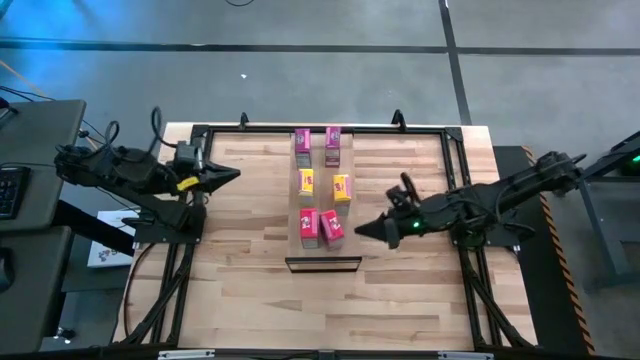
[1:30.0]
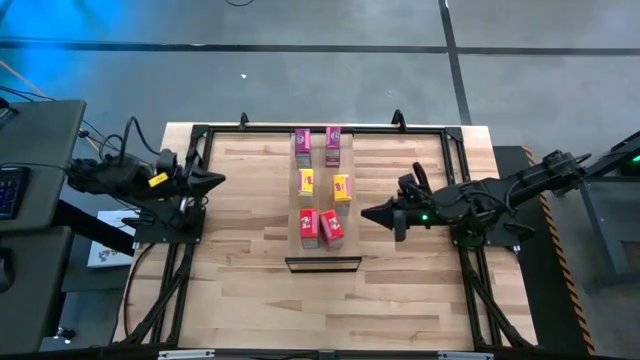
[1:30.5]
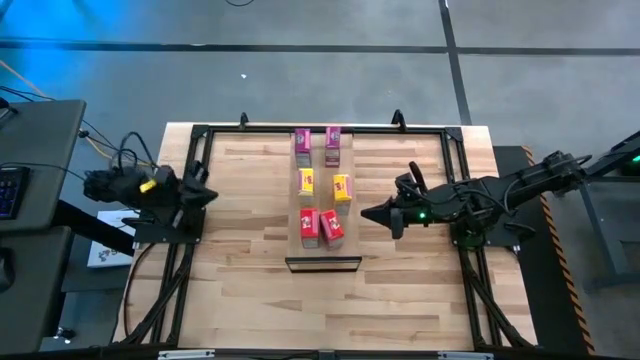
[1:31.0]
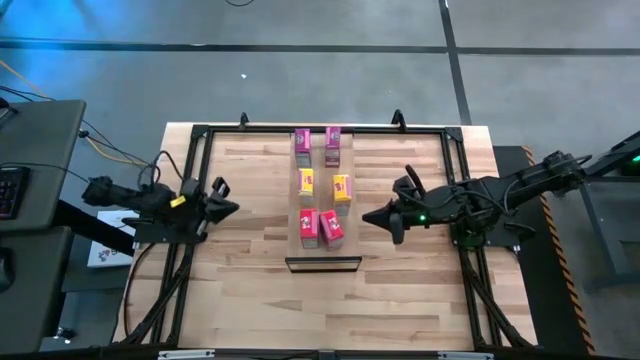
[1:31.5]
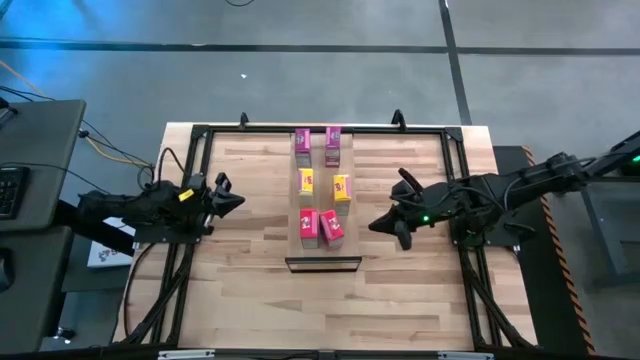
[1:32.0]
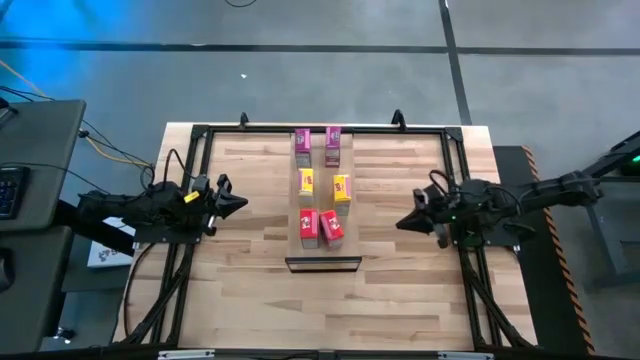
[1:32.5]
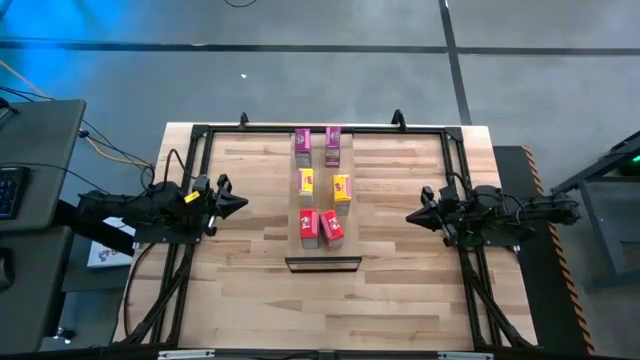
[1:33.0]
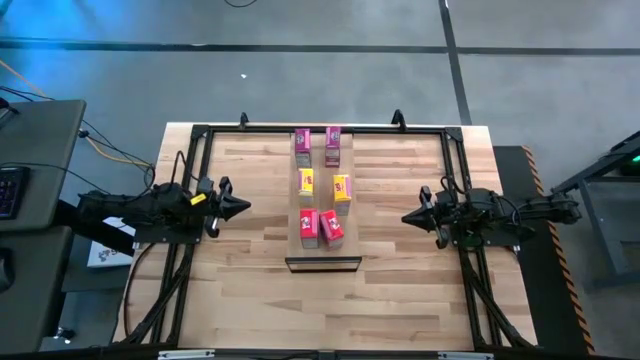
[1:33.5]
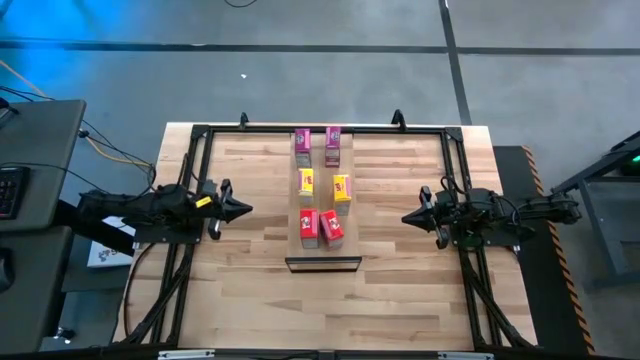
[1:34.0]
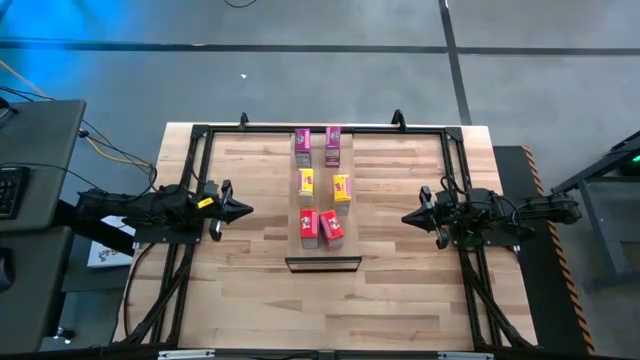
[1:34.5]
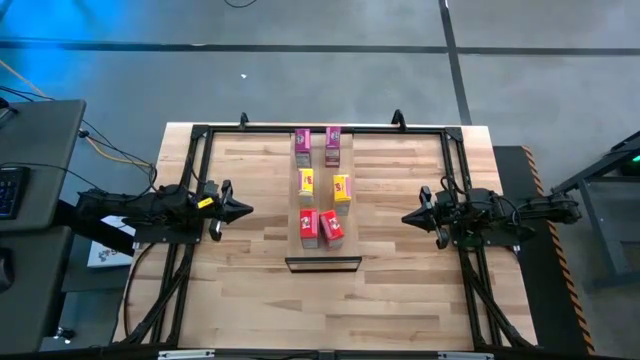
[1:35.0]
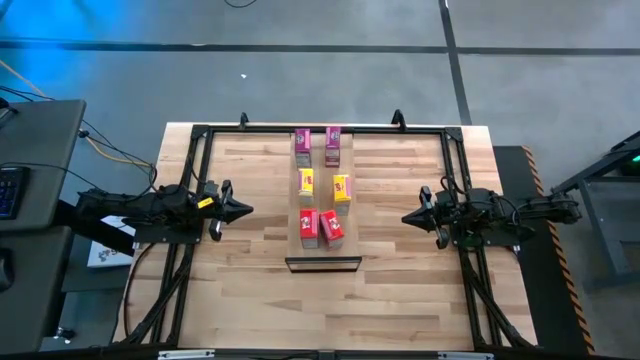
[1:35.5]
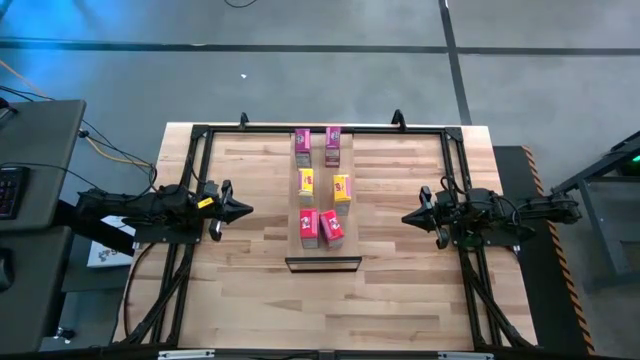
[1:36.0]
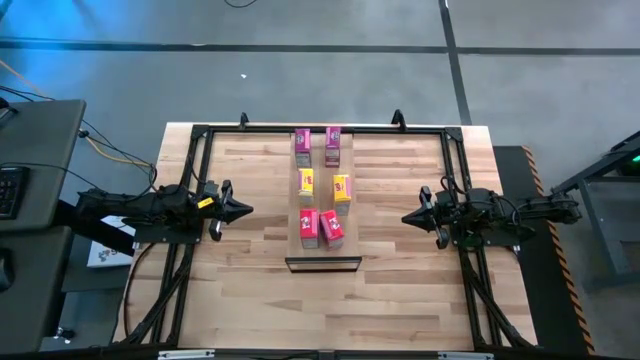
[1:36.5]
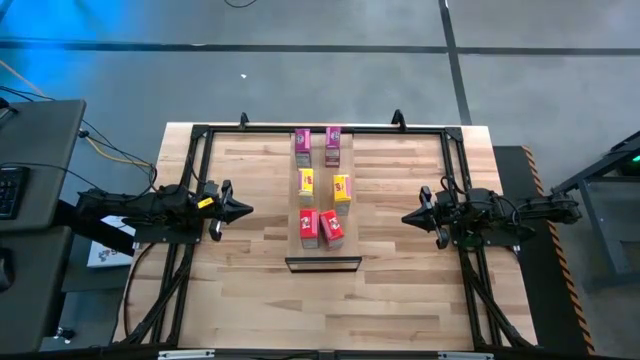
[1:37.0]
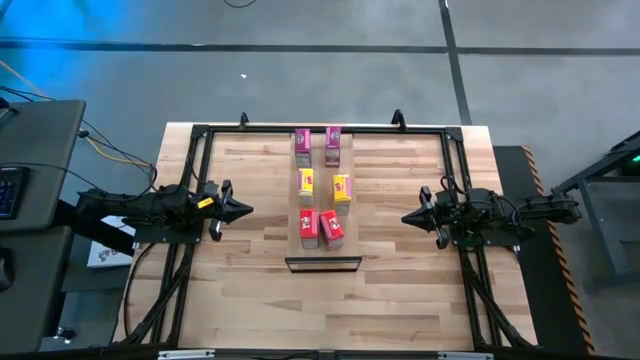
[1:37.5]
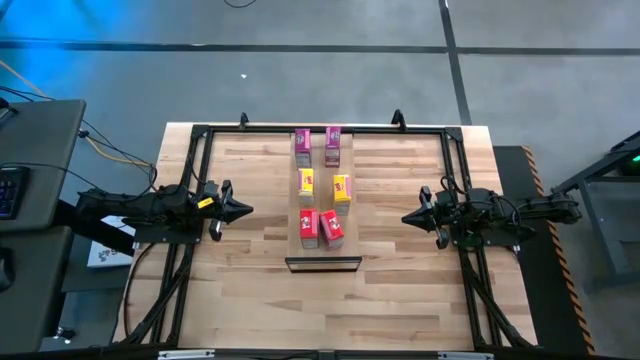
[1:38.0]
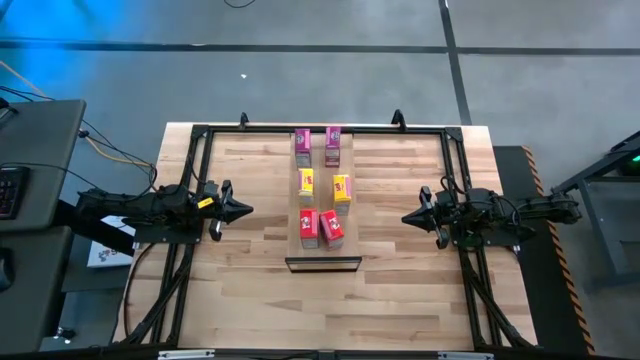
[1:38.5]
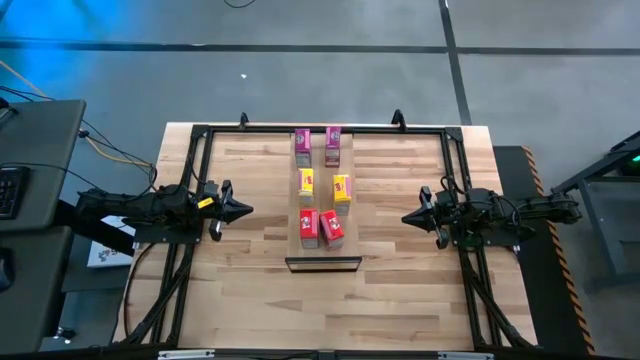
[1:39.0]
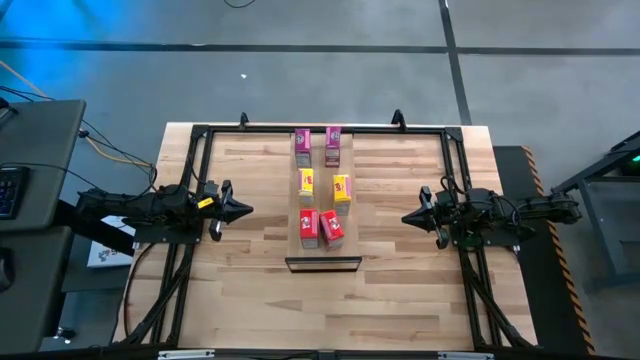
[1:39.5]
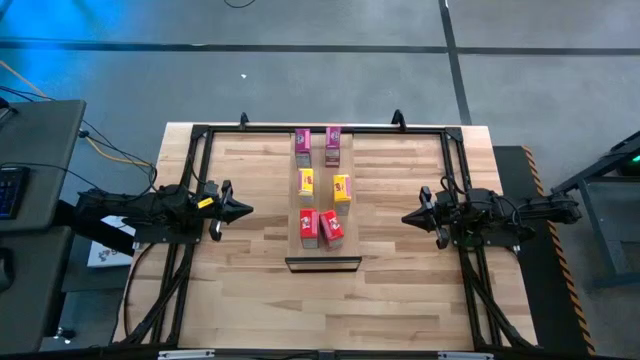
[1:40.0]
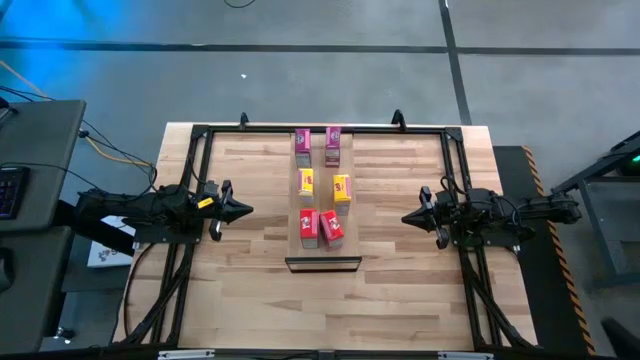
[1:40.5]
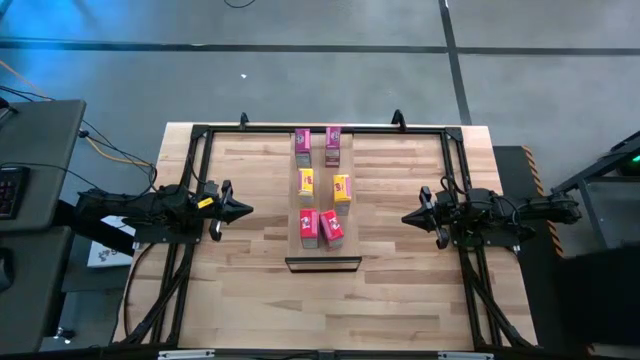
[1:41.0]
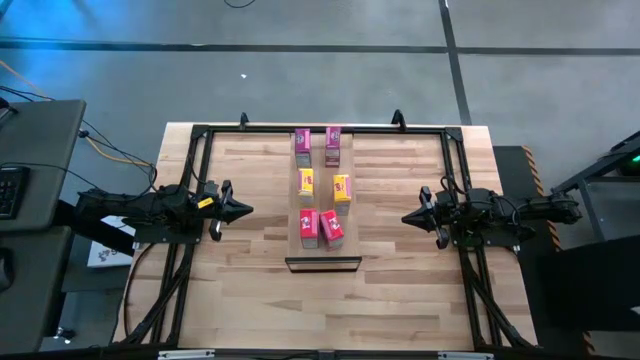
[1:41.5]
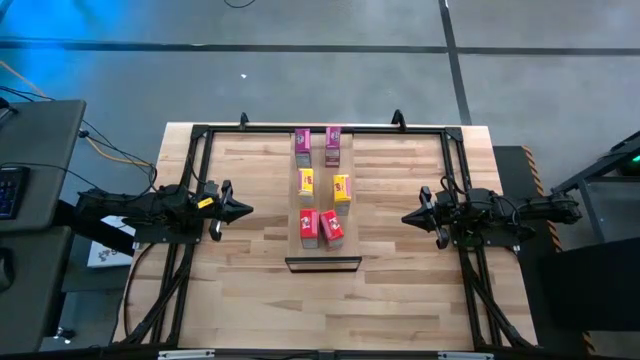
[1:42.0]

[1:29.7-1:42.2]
Task: Stack cereal on shelf
Return to Home Position

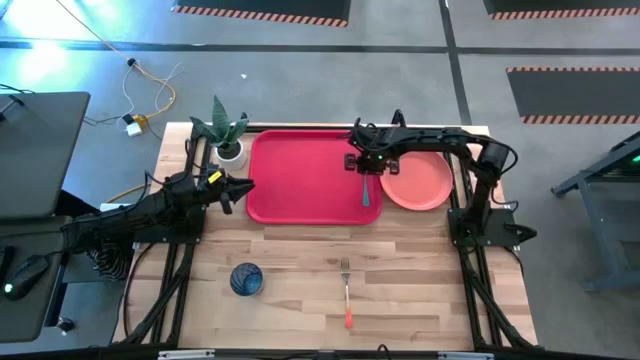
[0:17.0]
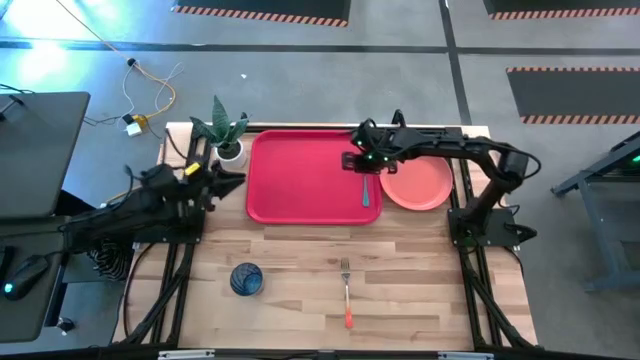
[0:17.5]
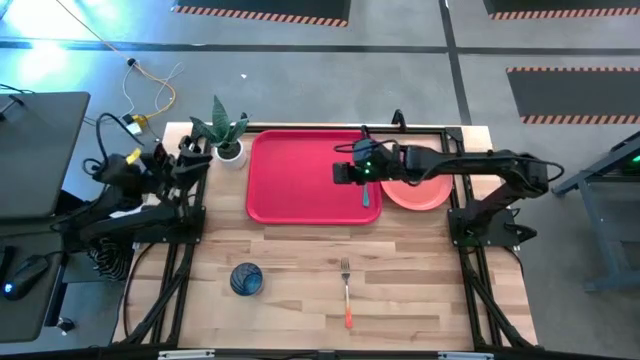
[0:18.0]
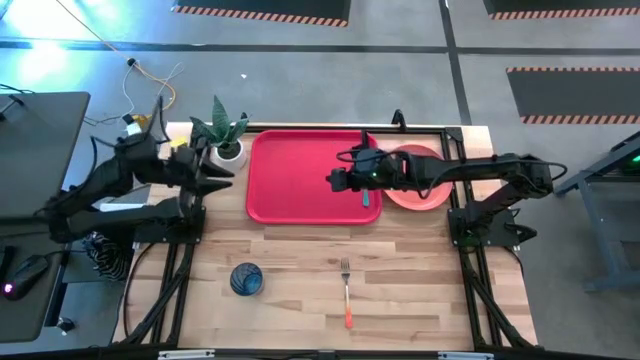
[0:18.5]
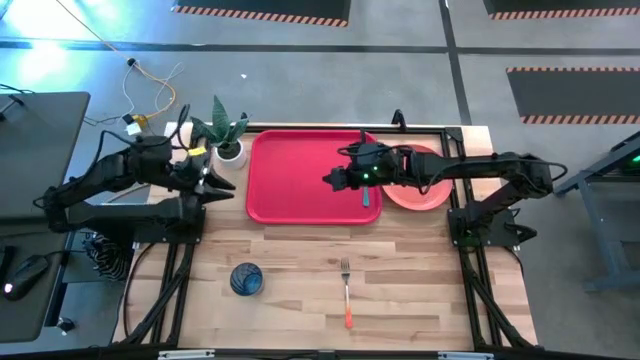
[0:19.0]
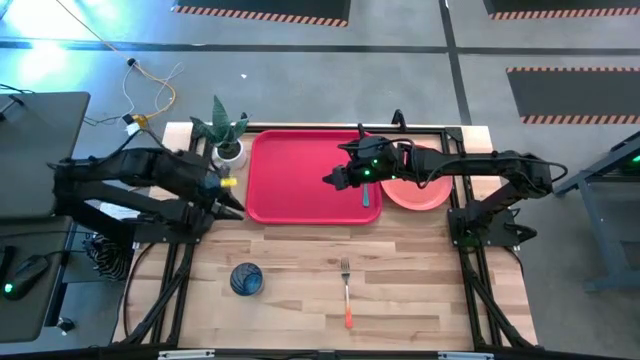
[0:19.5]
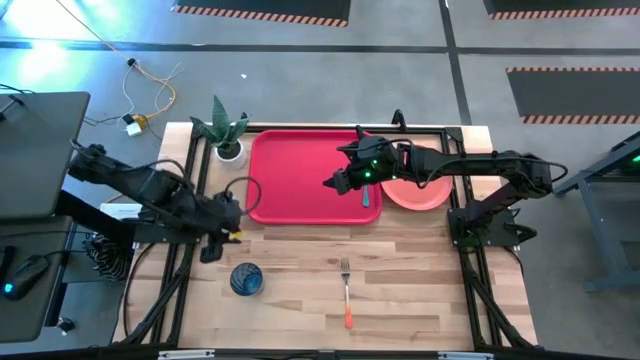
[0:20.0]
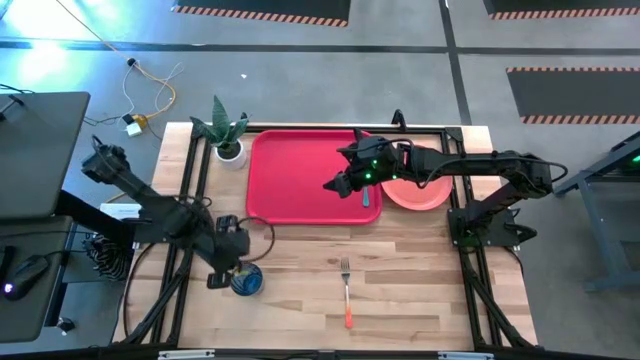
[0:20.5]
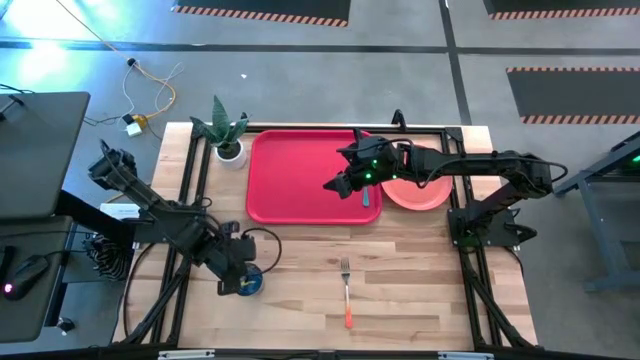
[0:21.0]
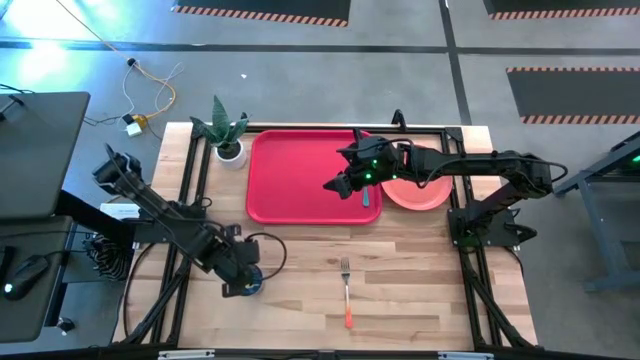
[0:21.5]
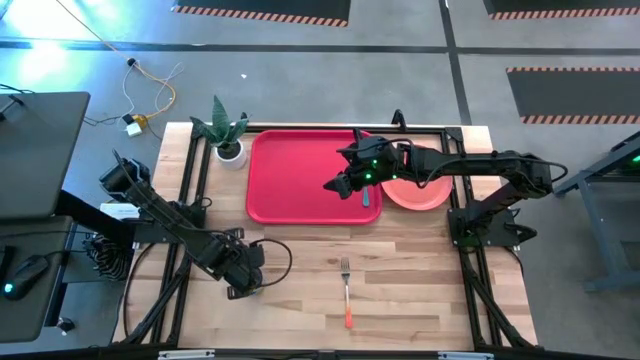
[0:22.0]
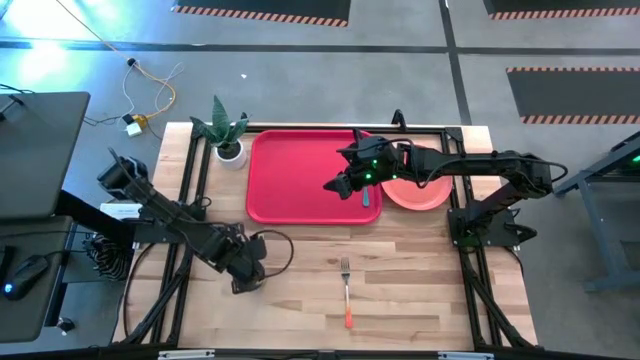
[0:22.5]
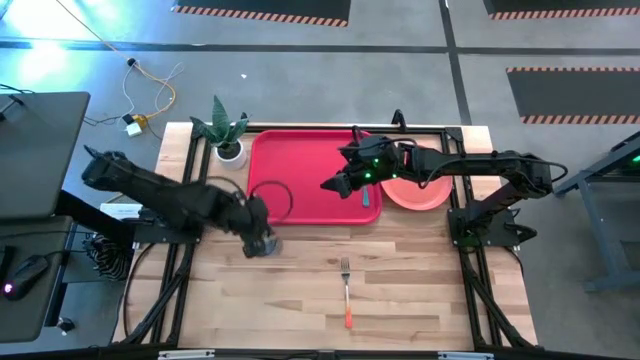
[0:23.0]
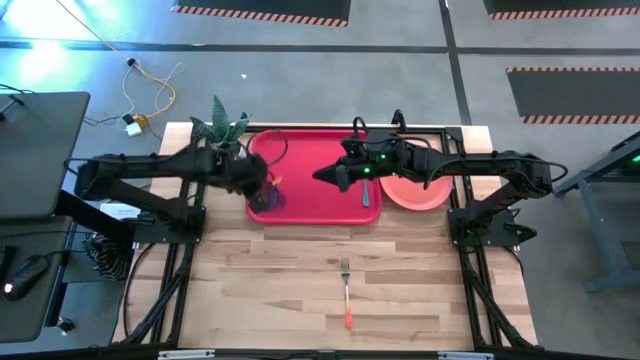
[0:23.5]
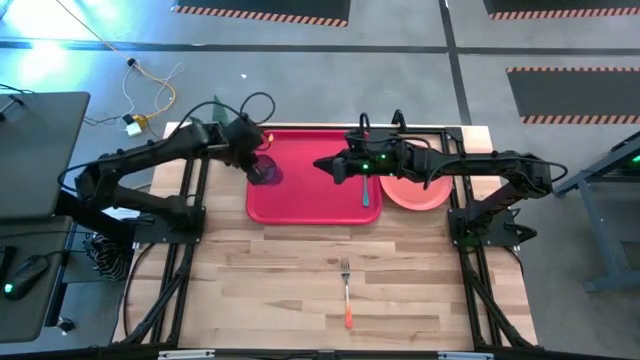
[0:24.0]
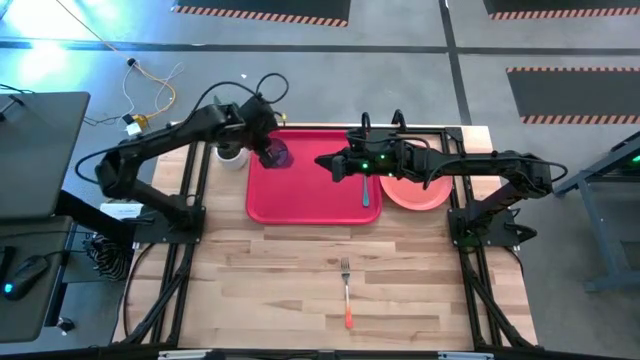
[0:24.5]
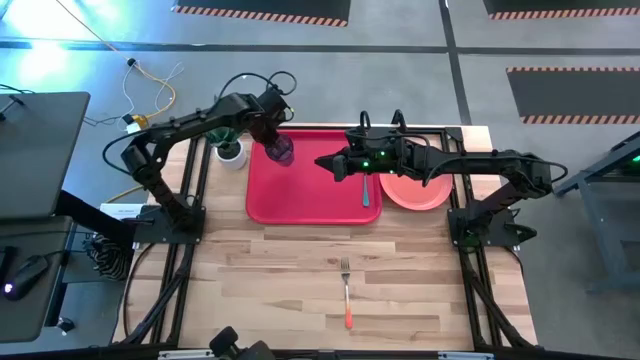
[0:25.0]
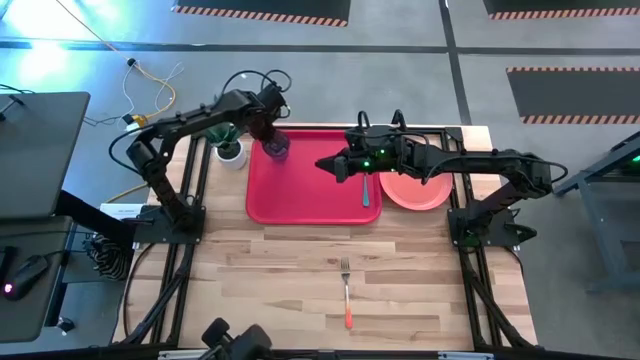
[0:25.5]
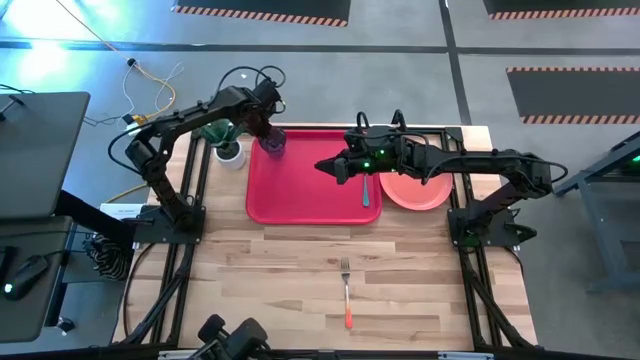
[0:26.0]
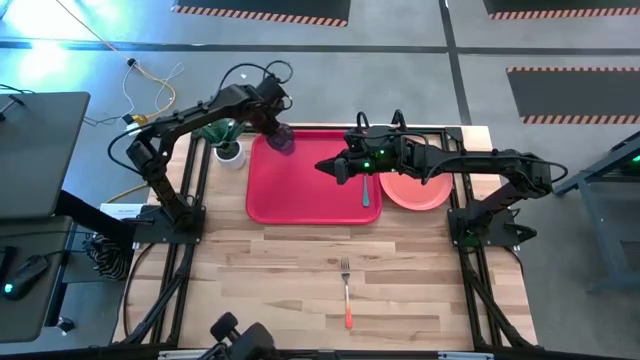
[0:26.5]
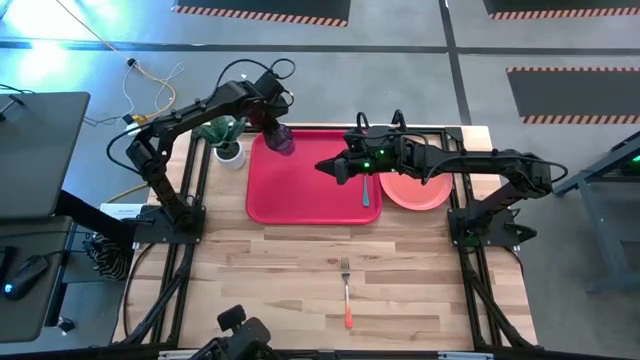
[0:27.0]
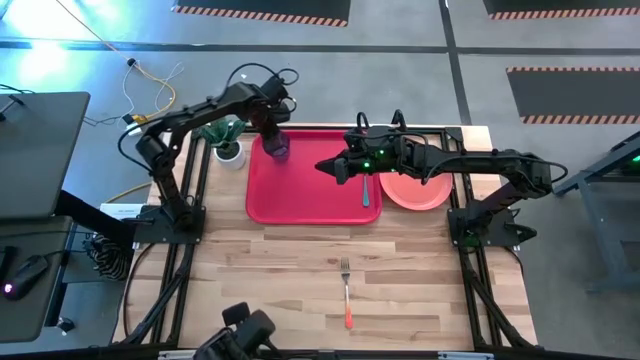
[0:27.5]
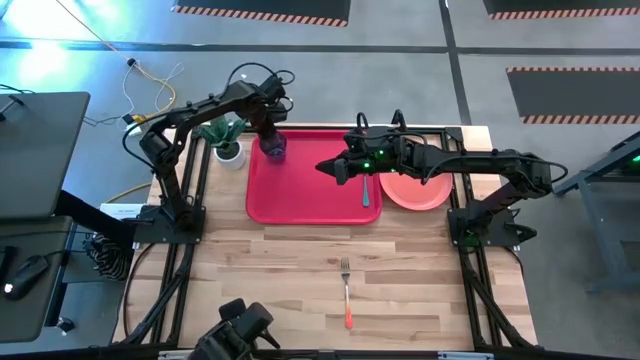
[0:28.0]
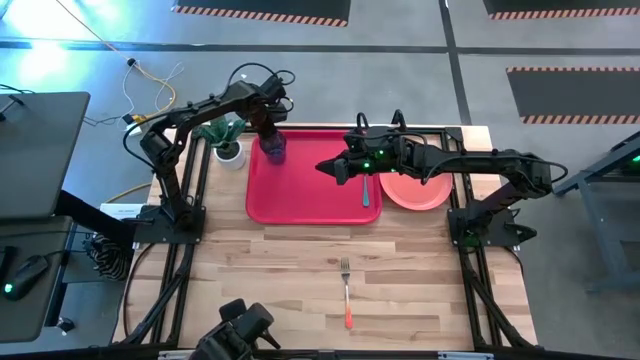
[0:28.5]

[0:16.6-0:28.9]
Task: Pick and place plate/cup/fork/spoon on tray
Put the blue cup on the red serving tray to the top right of the blue spoon
